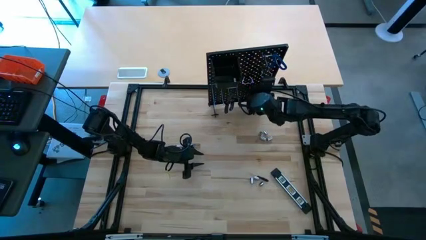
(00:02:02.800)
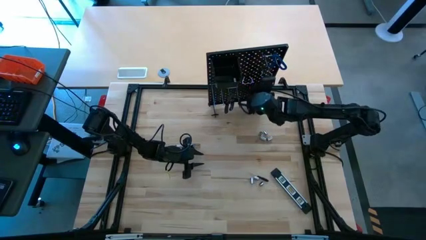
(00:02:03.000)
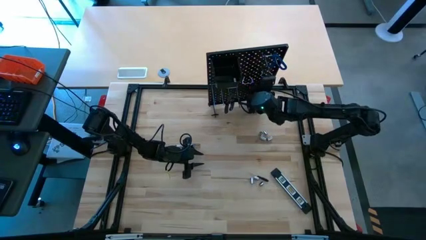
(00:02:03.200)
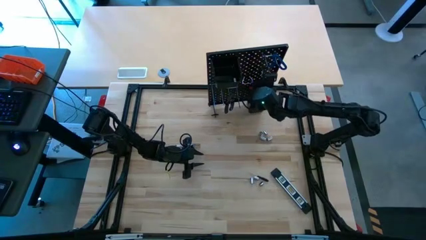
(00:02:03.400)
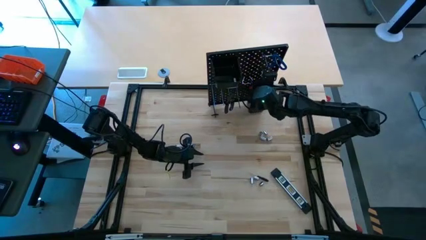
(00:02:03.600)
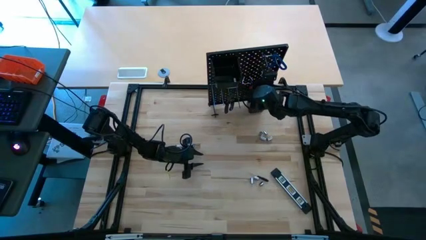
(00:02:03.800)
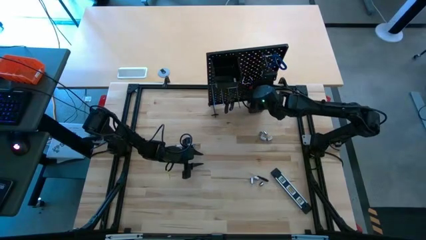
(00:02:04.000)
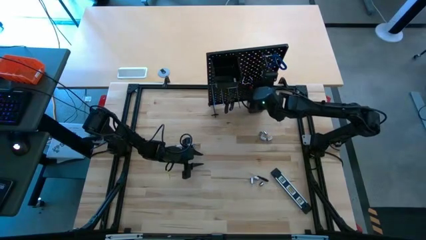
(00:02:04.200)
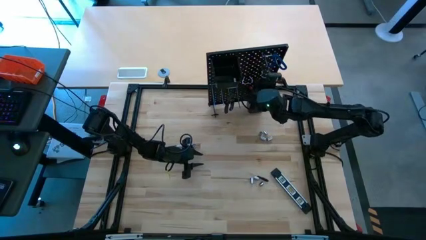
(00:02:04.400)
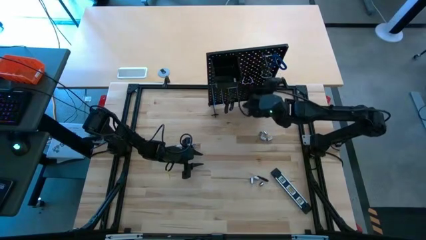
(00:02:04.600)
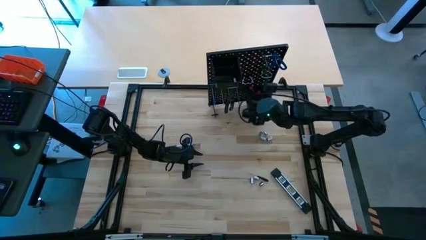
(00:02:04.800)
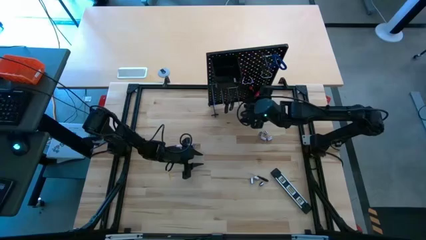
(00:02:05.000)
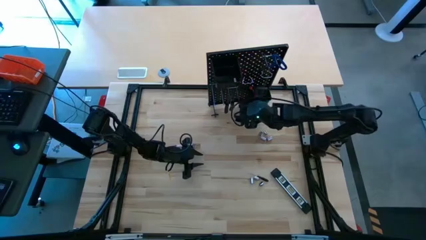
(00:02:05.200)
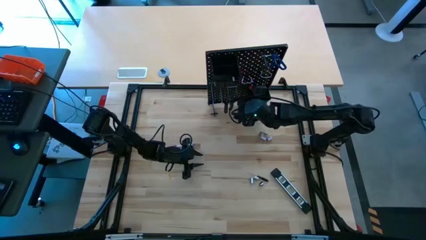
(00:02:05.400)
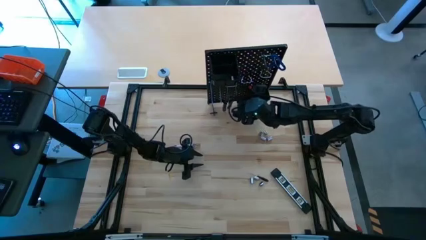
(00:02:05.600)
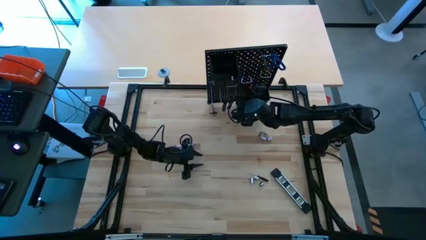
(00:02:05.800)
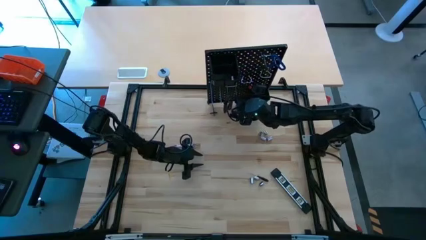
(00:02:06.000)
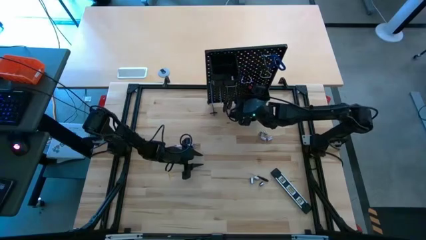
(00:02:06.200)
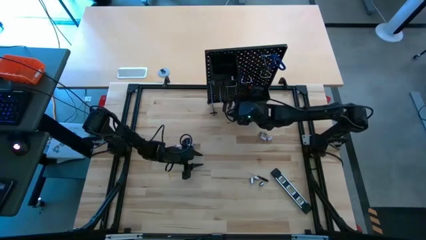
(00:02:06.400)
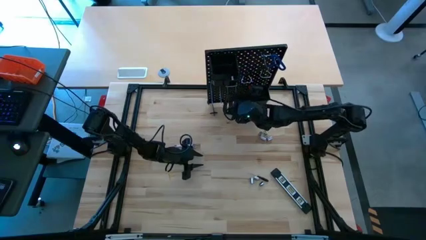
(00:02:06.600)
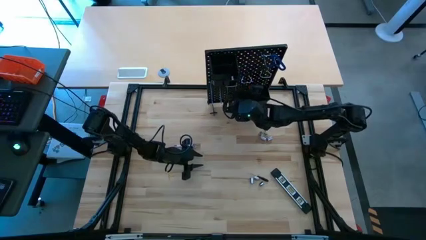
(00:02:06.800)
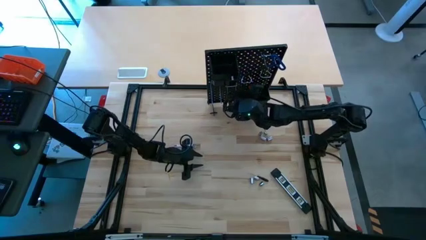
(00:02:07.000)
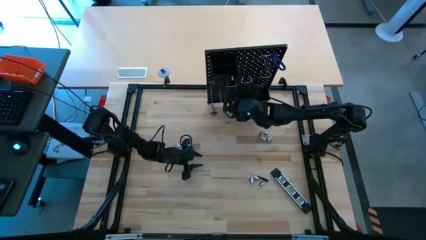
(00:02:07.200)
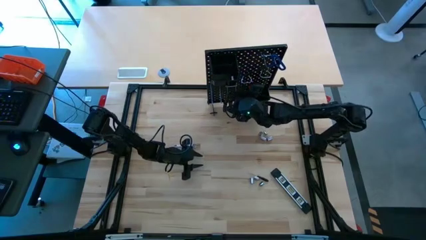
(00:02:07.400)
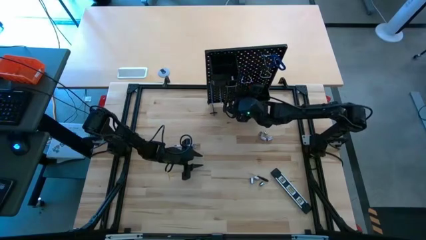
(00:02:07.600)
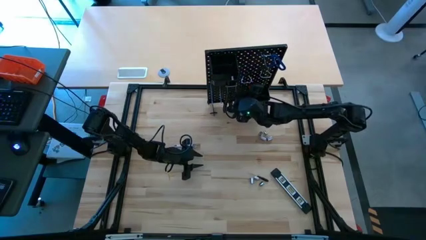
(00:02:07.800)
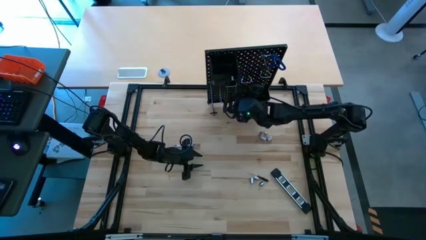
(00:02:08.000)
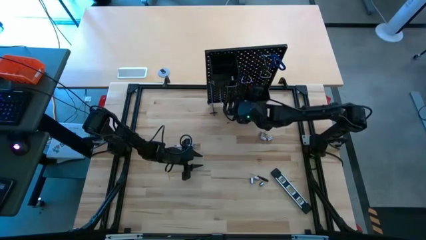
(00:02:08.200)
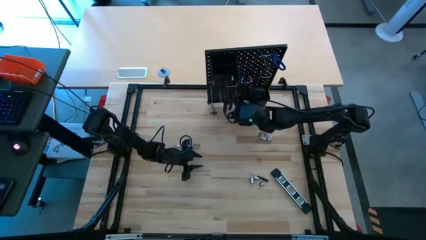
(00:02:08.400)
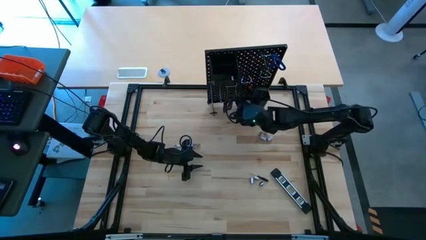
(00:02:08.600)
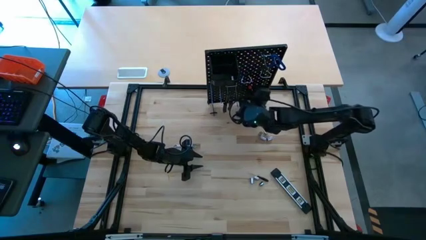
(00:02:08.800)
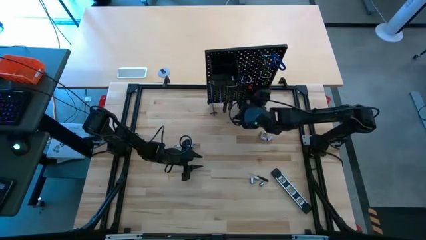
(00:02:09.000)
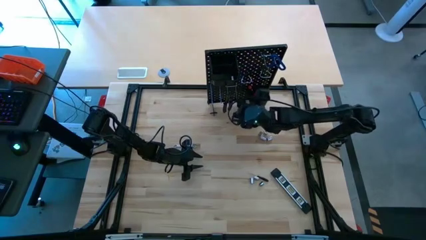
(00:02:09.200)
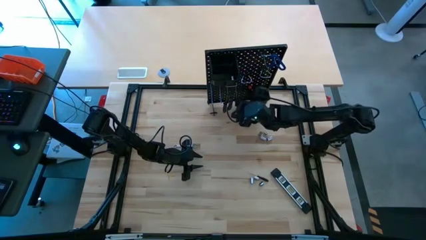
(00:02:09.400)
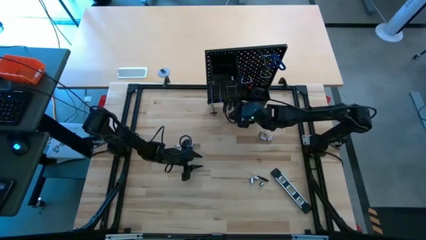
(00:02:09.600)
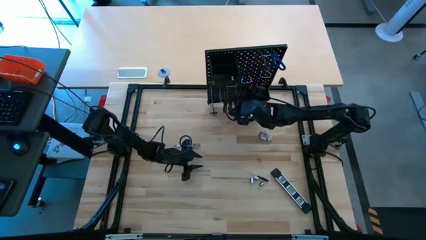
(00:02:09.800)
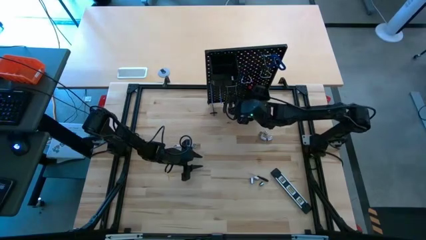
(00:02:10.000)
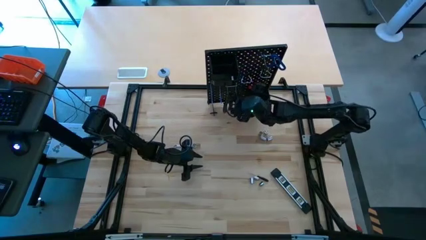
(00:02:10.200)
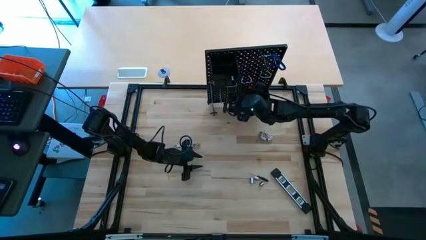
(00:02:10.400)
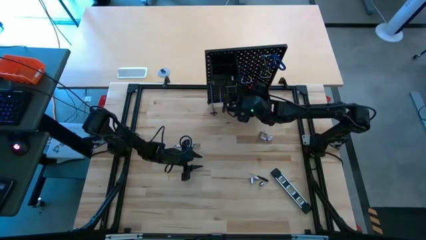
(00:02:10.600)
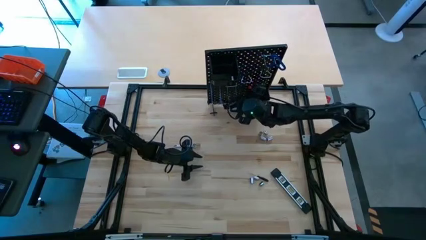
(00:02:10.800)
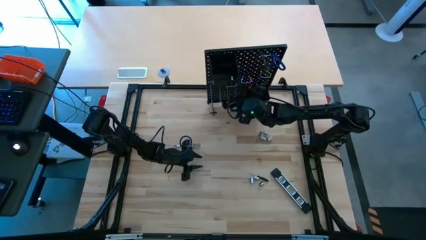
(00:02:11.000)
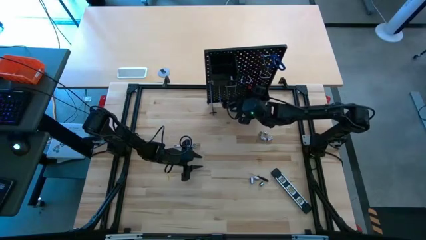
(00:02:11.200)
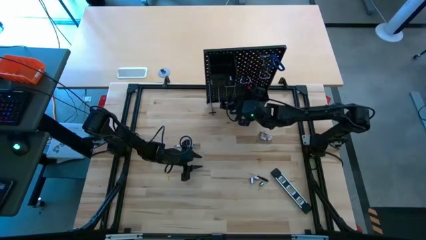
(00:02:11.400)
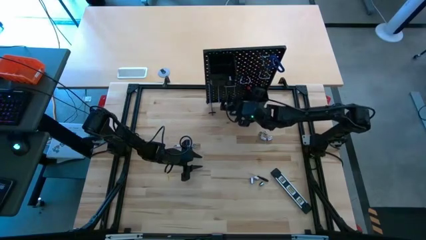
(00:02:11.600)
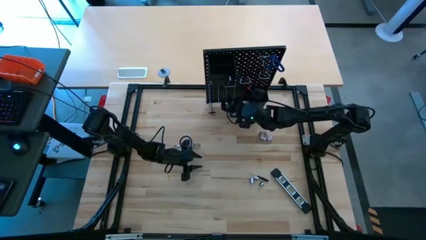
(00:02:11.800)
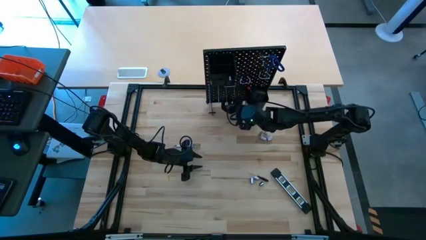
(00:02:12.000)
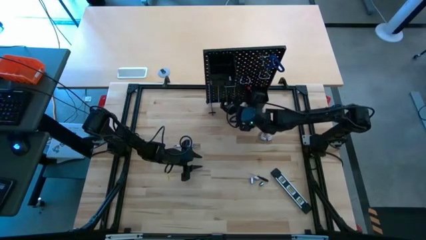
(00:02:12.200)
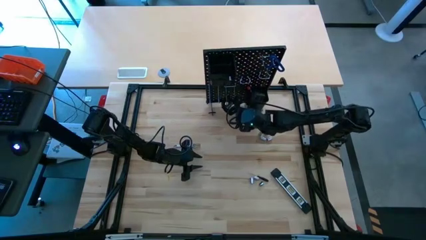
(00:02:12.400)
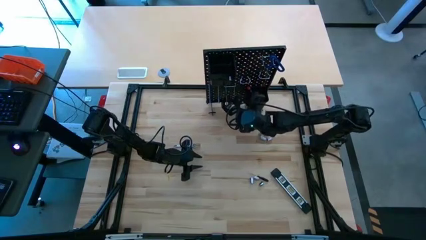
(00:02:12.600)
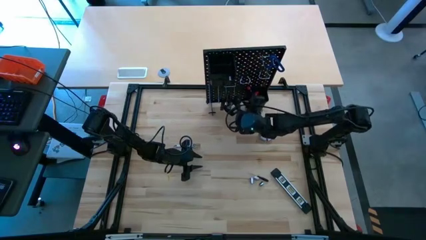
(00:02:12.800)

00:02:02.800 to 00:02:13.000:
Task: Hang tools onto peg board
Hang the black clamp on the peg board

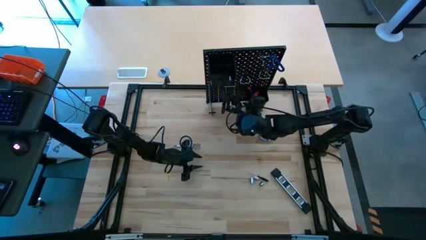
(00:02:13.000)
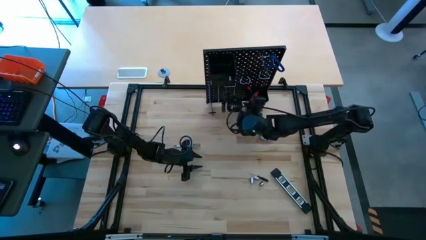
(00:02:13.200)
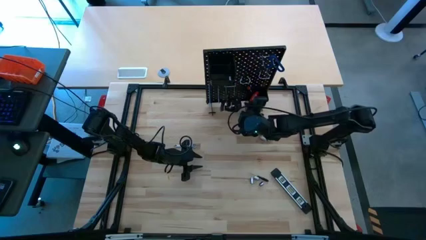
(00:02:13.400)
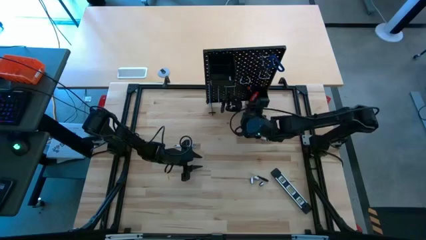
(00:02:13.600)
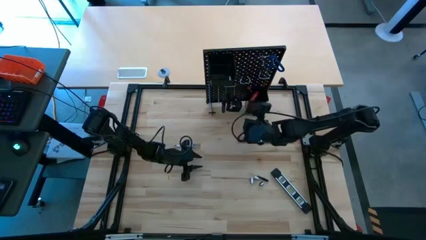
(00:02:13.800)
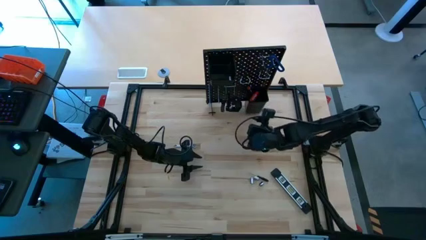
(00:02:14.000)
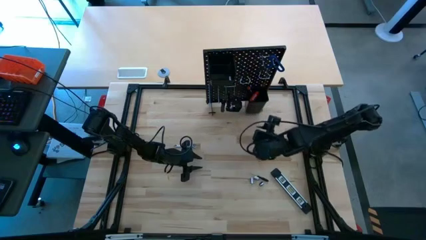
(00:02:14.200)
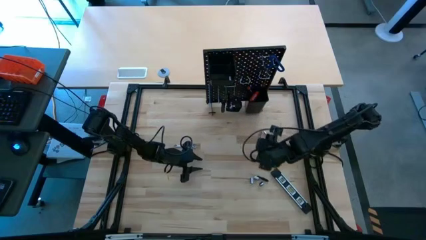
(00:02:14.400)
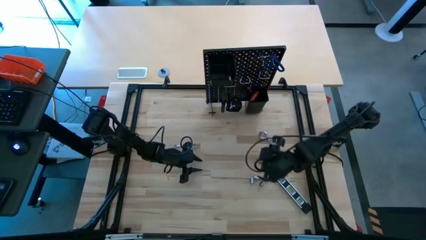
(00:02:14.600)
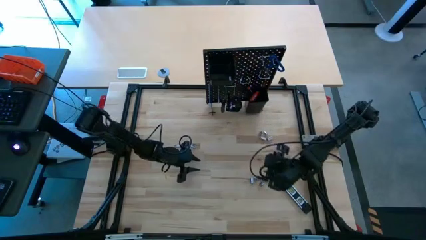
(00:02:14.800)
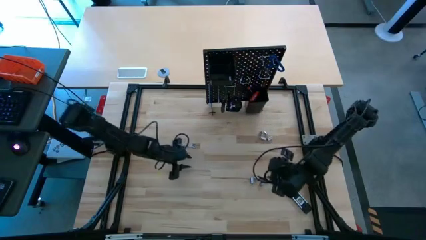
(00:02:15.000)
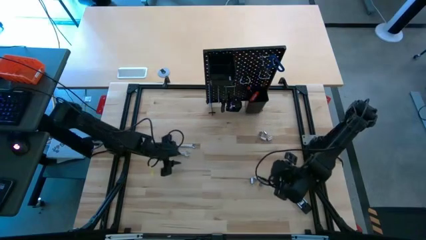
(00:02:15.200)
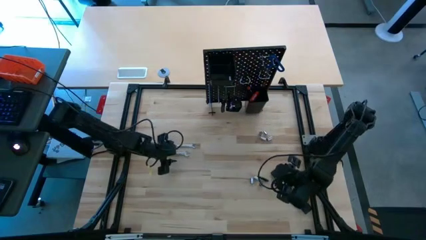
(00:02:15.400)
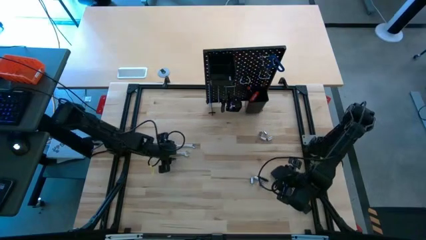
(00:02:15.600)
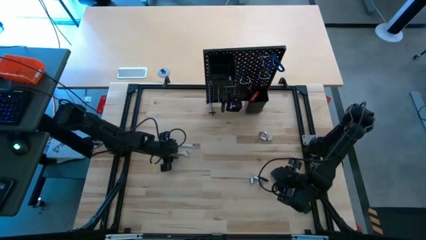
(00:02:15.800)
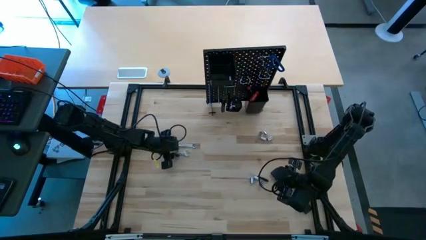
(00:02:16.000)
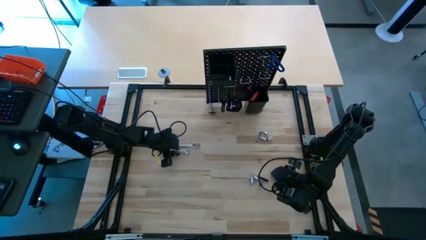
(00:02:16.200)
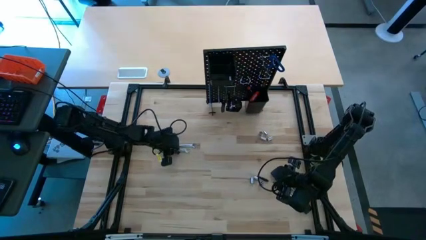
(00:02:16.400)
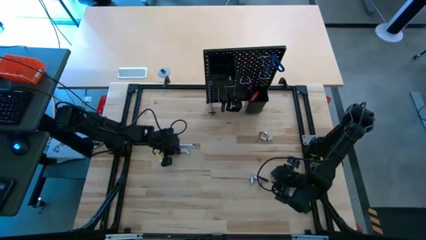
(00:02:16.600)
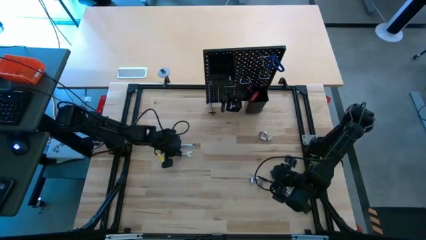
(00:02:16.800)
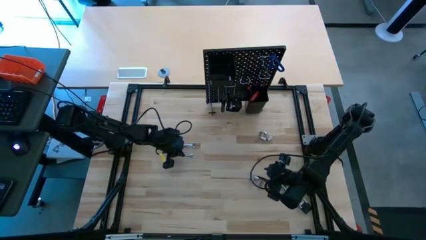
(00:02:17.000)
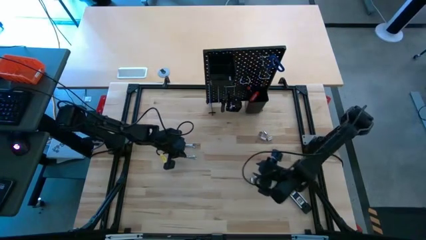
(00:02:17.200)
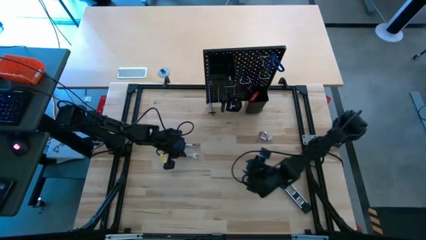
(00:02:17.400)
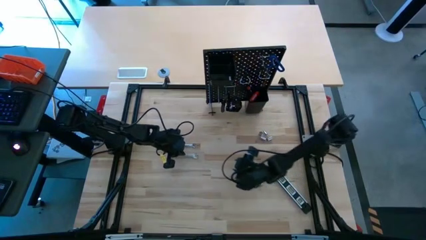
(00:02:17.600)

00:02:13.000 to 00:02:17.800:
Hang the silver wrench on the peg board

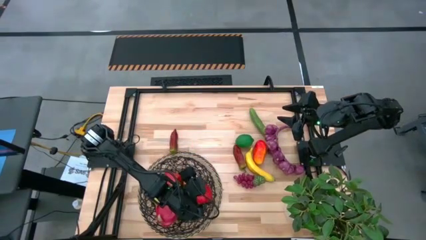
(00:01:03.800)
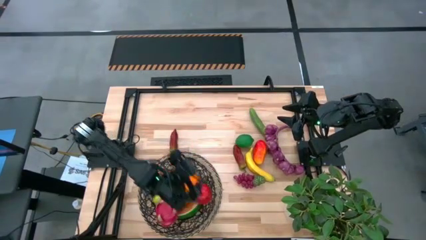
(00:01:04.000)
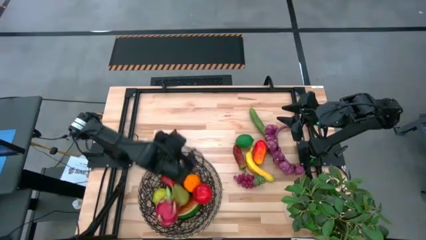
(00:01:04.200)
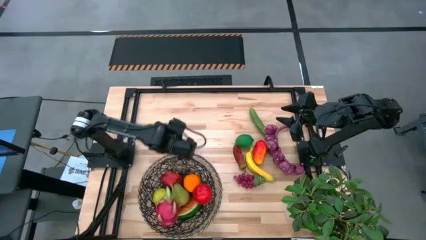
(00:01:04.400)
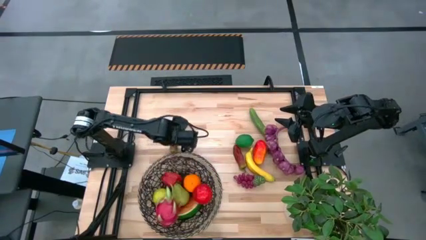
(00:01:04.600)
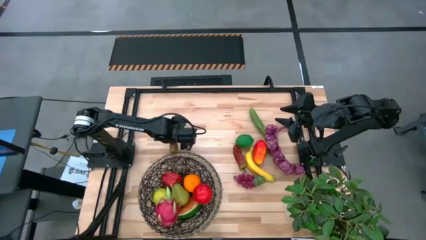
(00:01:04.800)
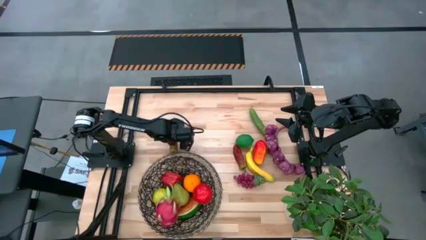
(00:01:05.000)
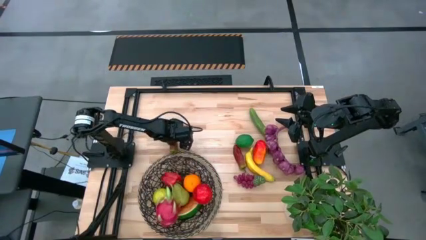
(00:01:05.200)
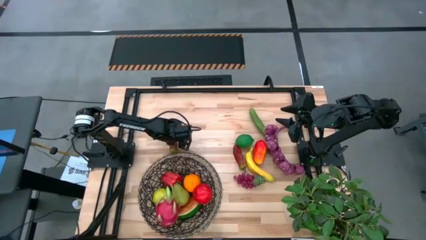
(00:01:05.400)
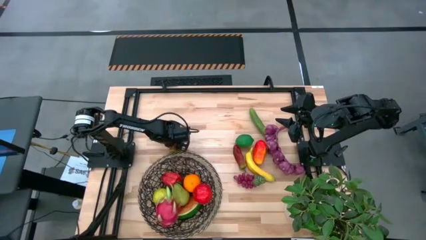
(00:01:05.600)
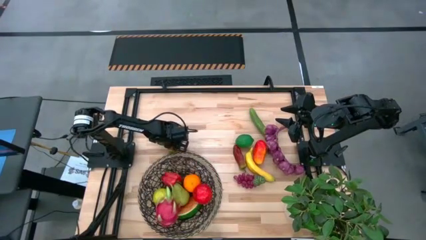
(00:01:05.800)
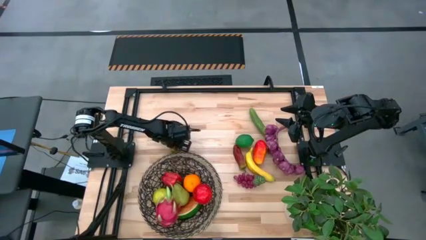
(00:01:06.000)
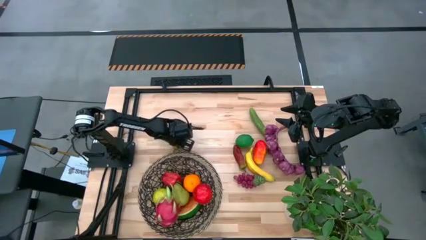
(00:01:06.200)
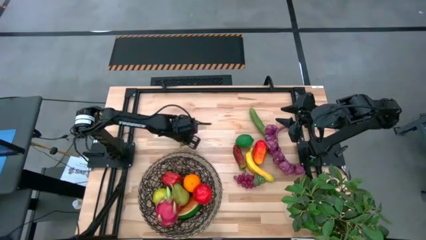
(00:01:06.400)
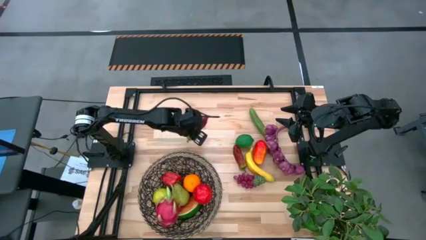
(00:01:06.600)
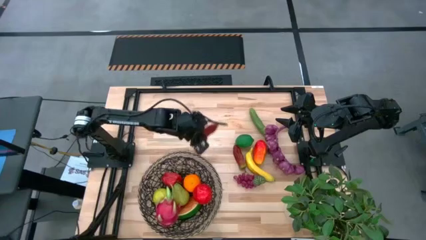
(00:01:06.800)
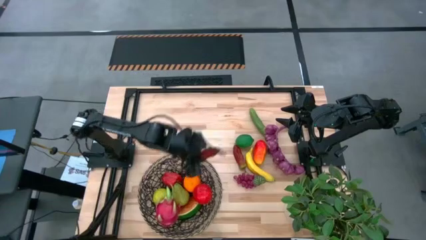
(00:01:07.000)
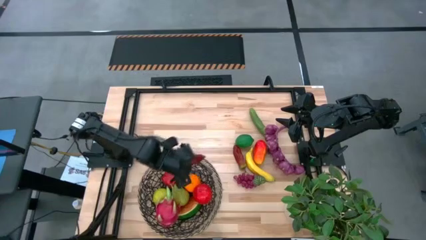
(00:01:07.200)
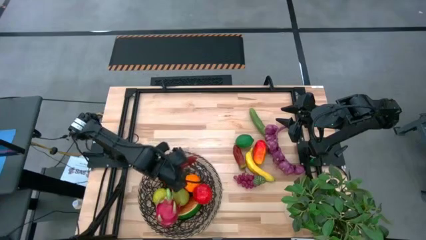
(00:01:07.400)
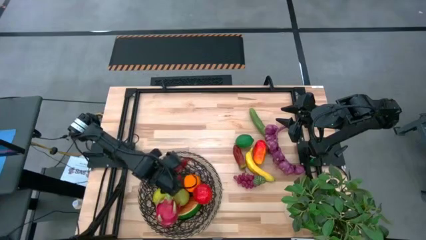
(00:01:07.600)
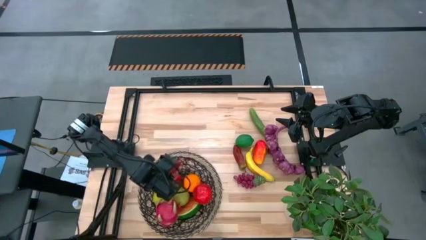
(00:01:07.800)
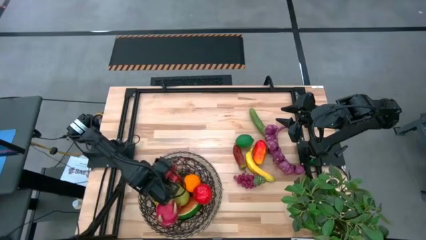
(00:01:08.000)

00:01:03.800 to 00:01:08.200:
Task: Build produce basket
Put the left red chili pepper into the woven basket
